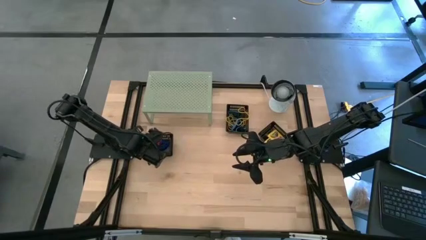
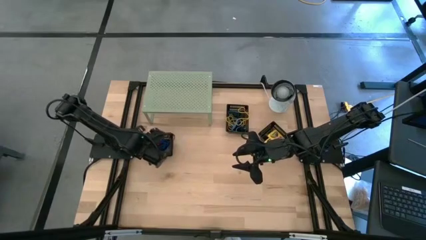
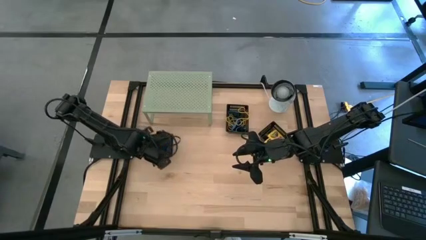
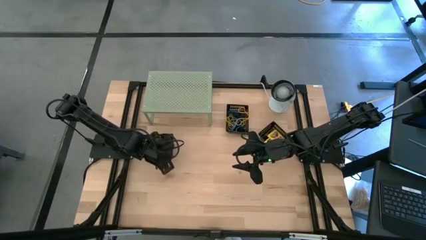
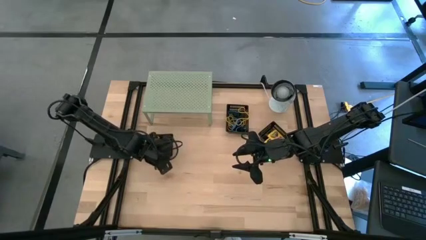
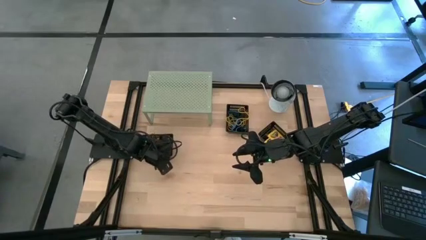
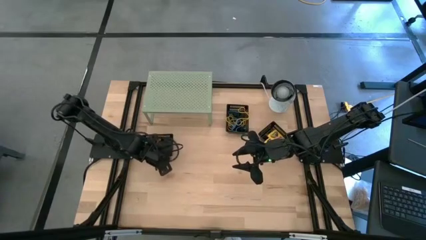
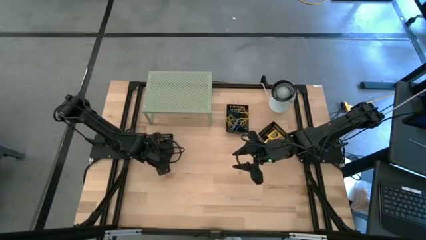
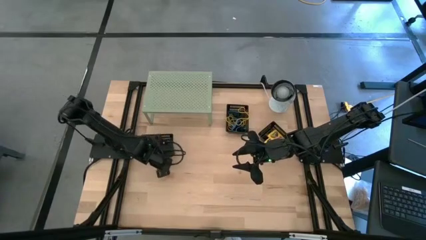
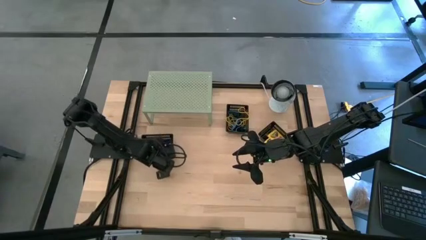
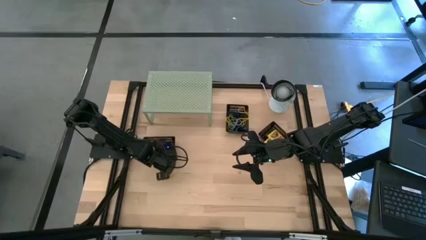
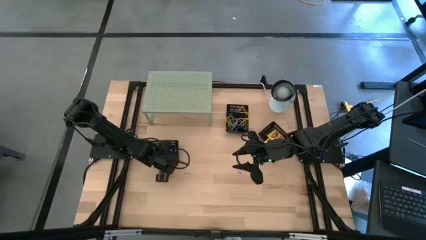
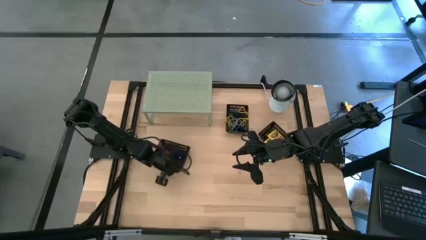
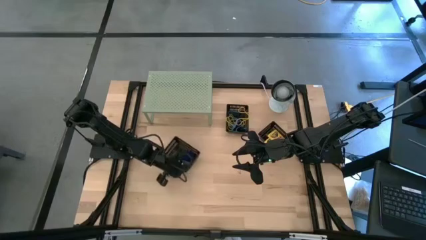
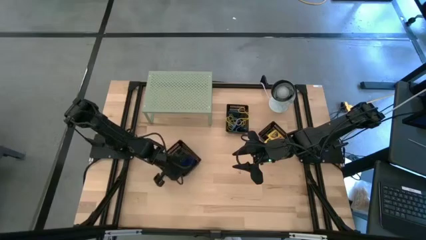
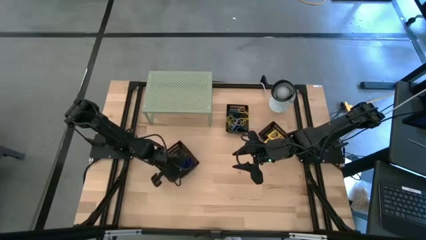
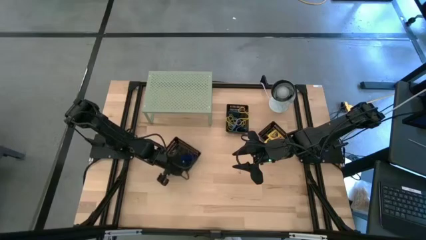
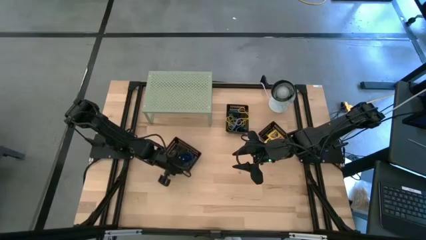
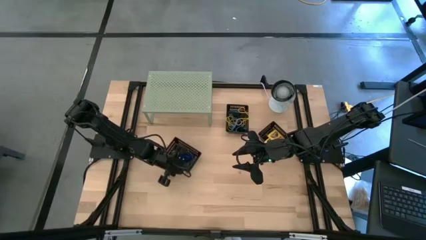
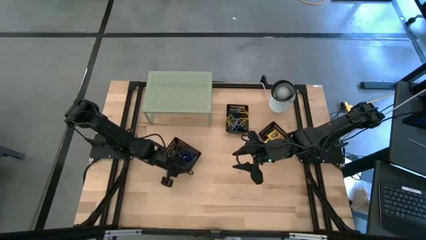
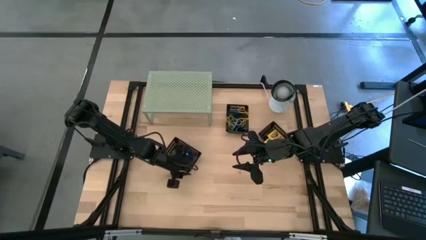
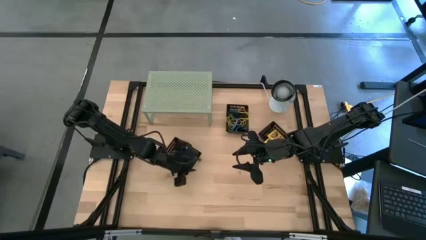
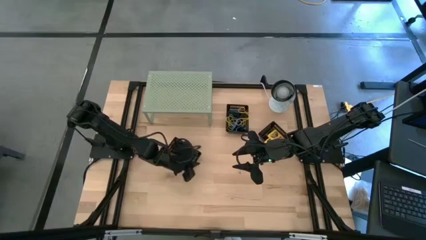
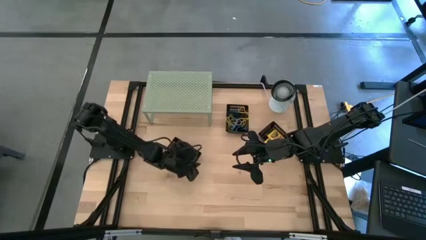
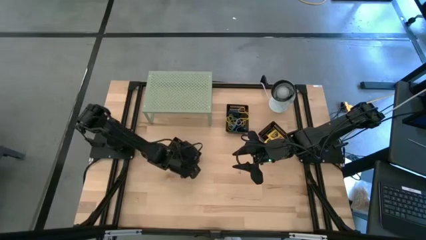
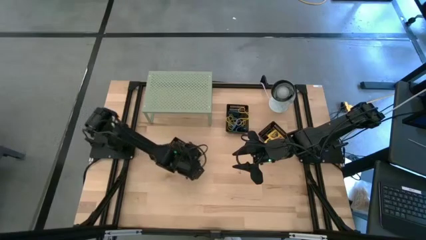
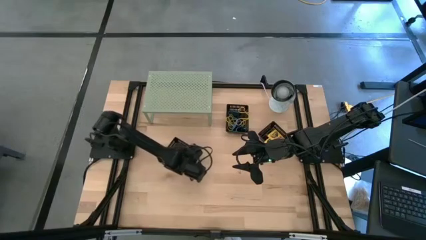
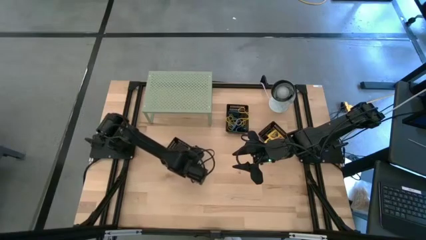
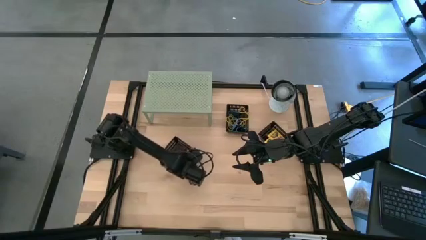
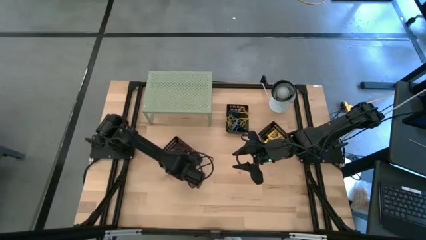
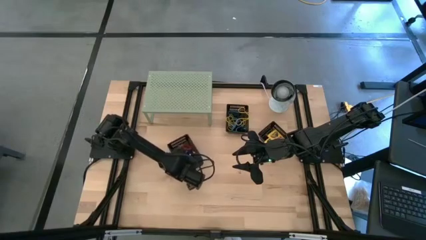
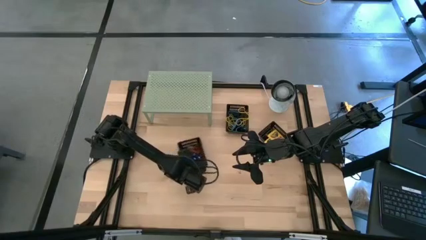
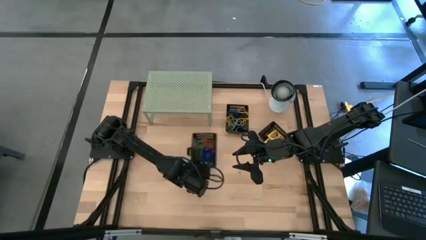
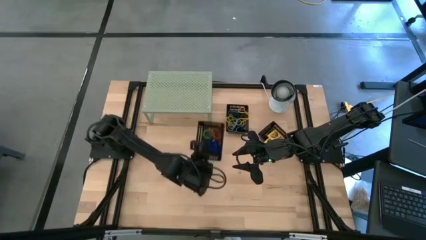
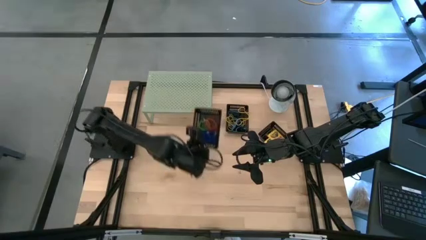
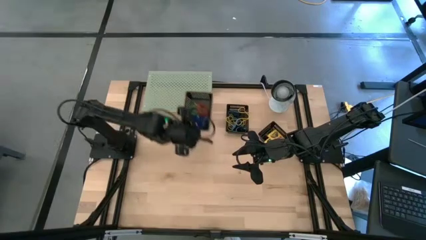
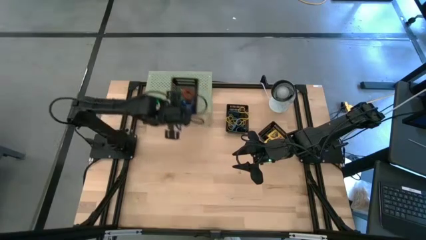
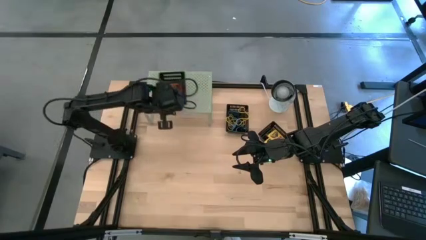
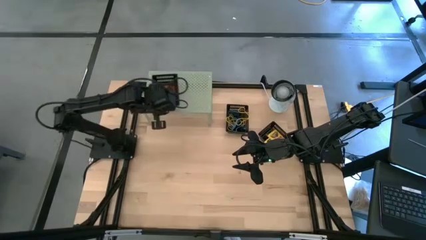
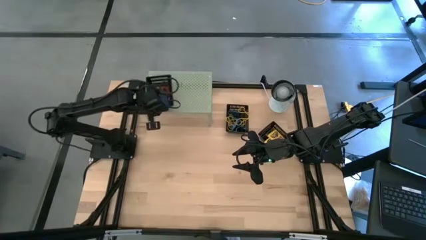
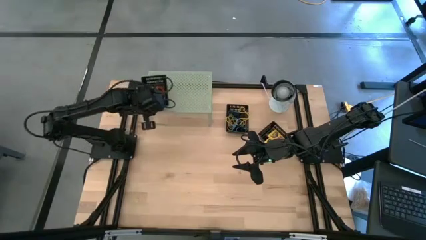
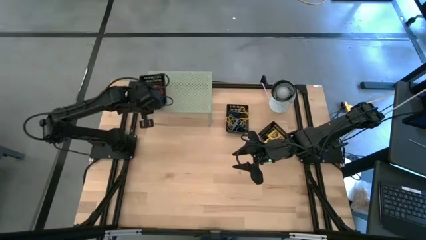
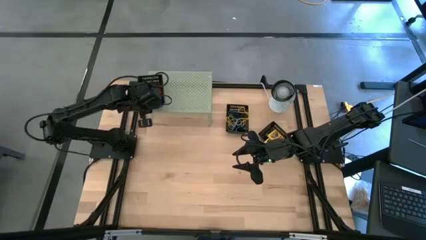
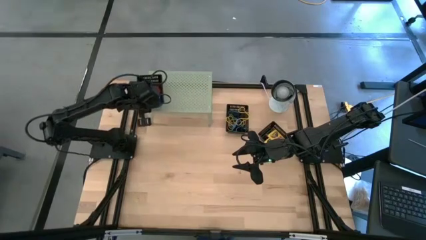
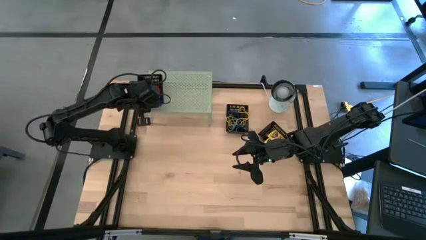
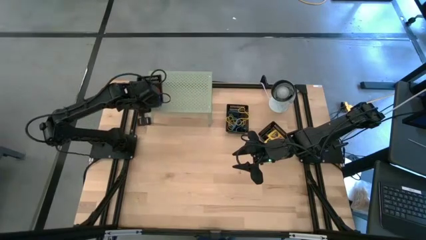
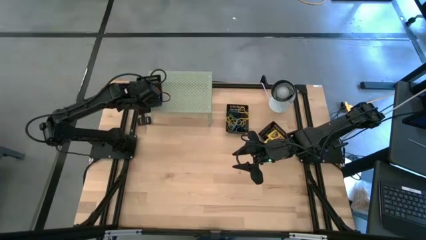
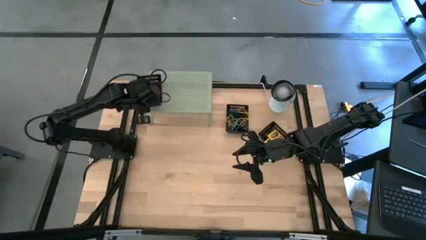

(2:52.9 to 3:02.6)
Task: Pick & Place Office Desk Supplies
Put the left black bin on the shelf

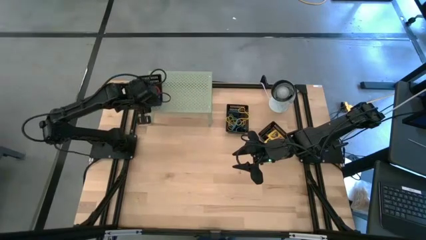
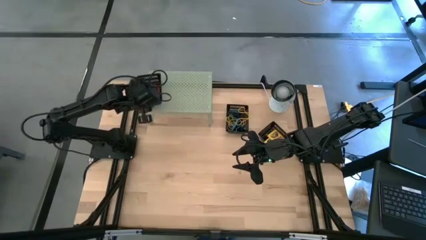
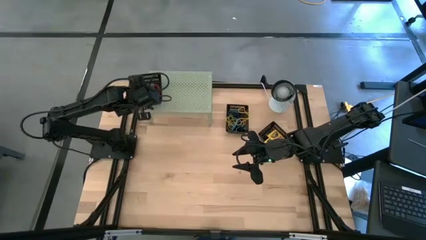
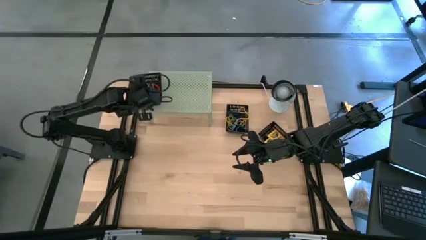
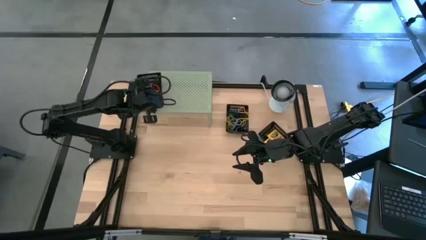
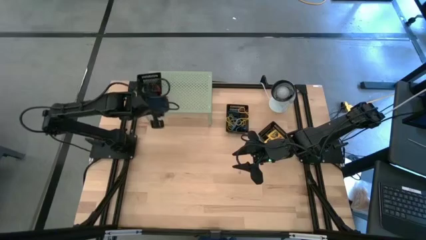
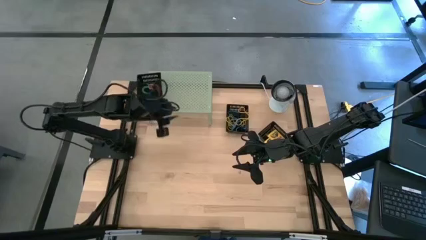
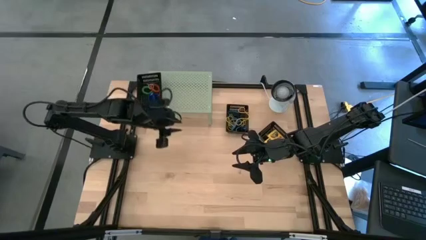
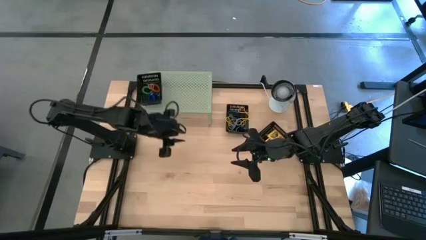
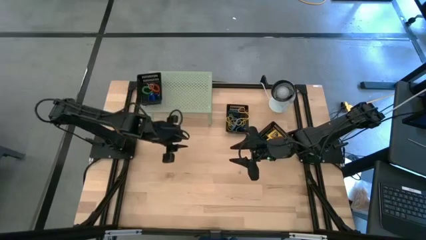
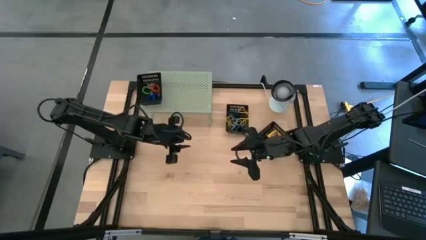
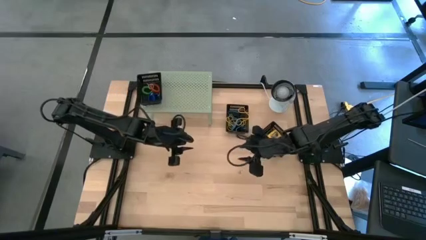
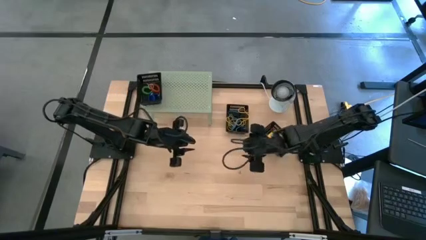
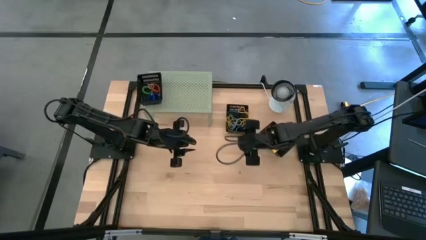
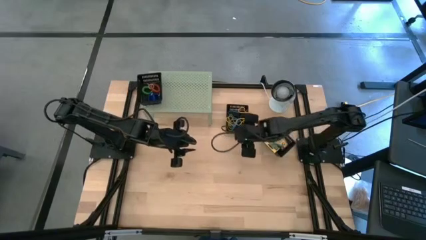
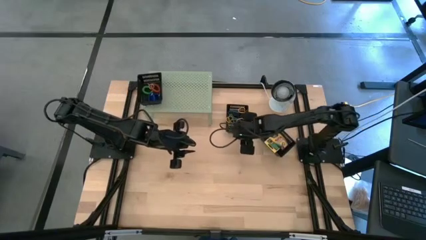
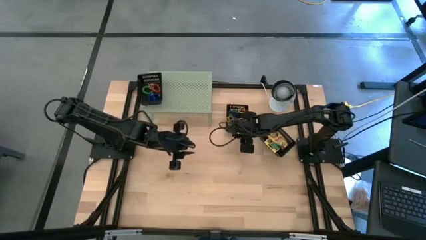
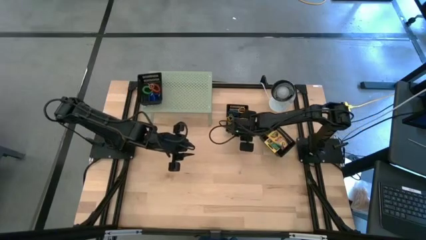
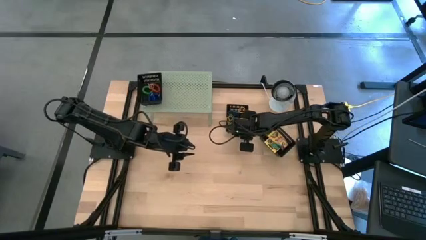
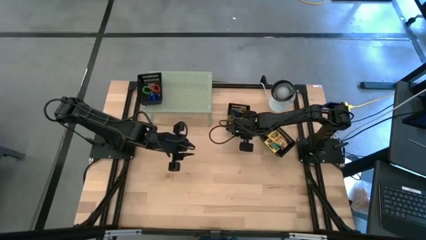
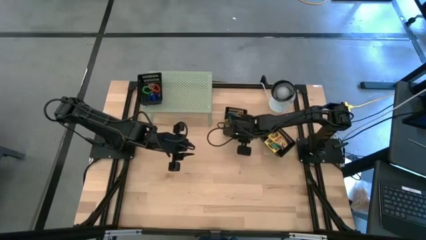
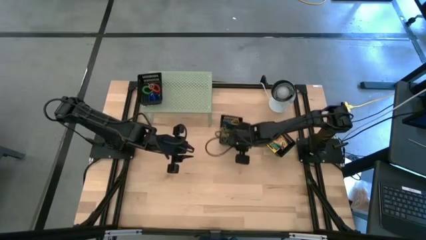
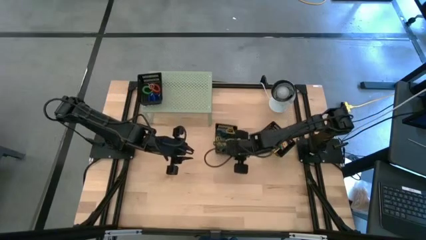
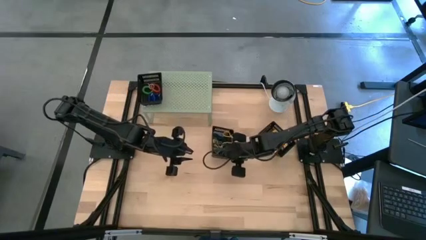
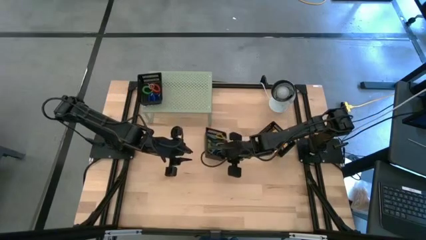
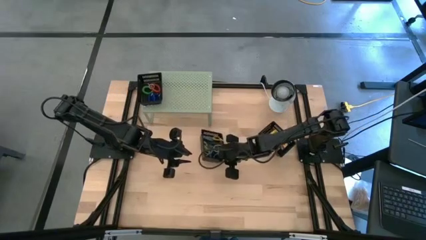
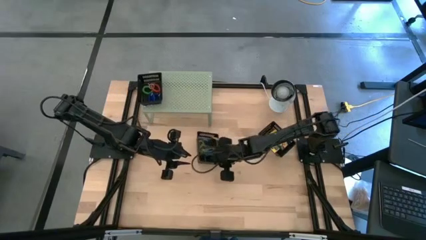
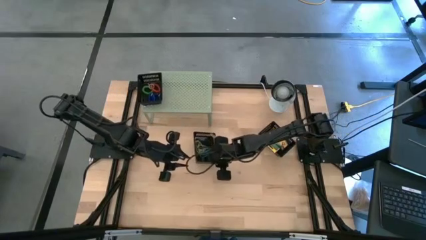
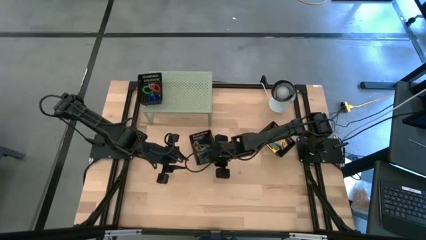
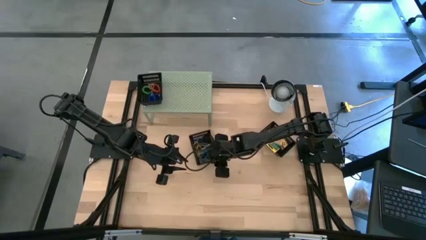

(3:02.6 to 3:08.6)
Put the top black bin on the shelf
